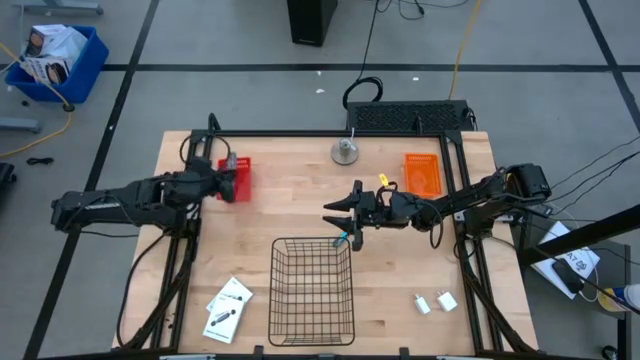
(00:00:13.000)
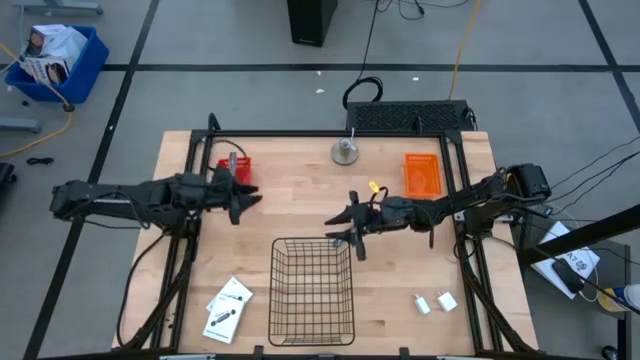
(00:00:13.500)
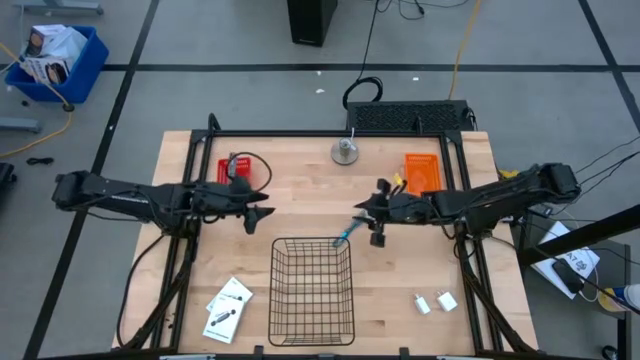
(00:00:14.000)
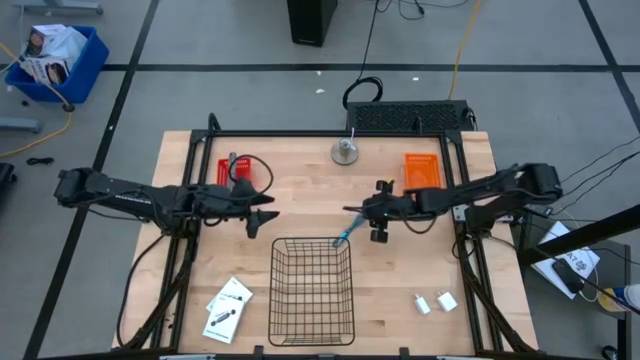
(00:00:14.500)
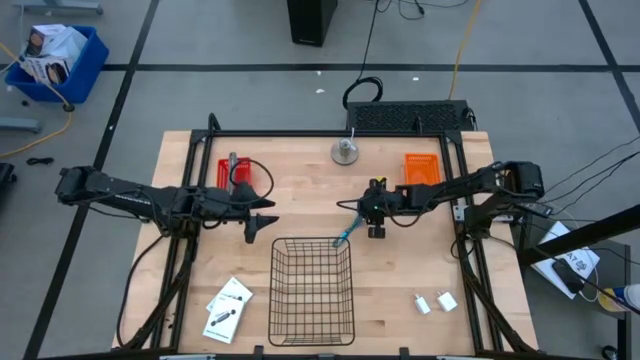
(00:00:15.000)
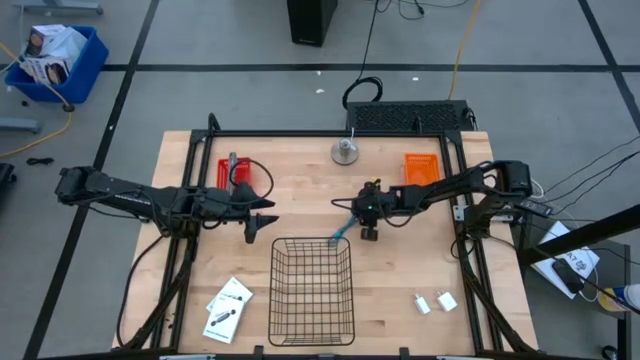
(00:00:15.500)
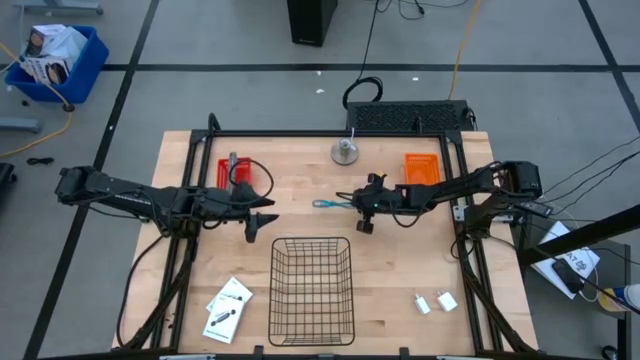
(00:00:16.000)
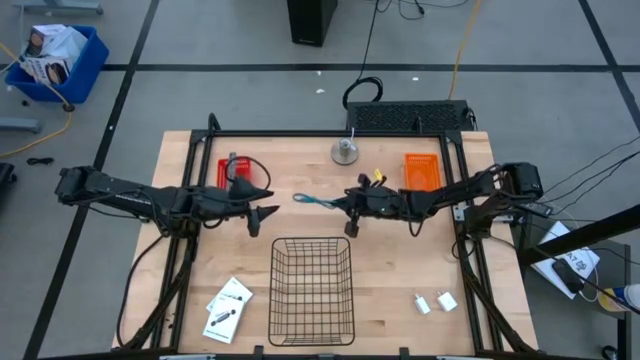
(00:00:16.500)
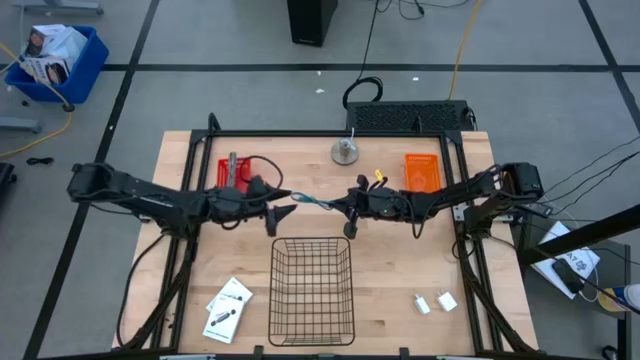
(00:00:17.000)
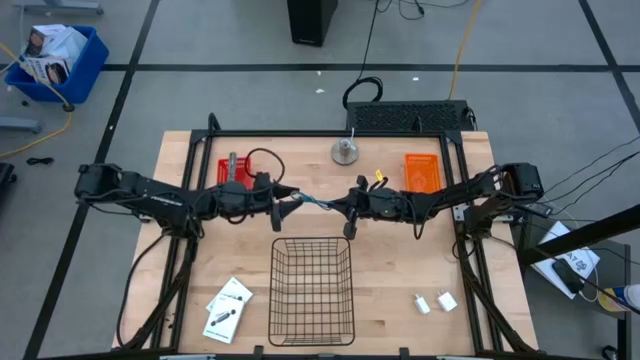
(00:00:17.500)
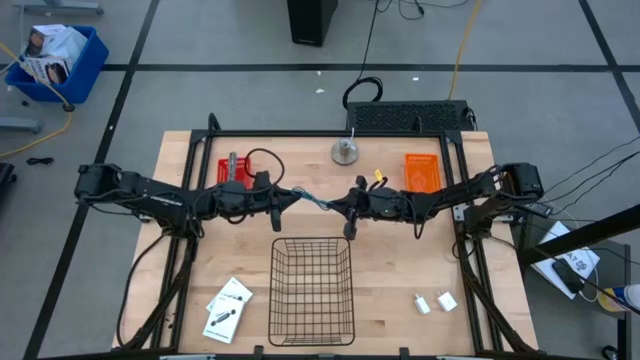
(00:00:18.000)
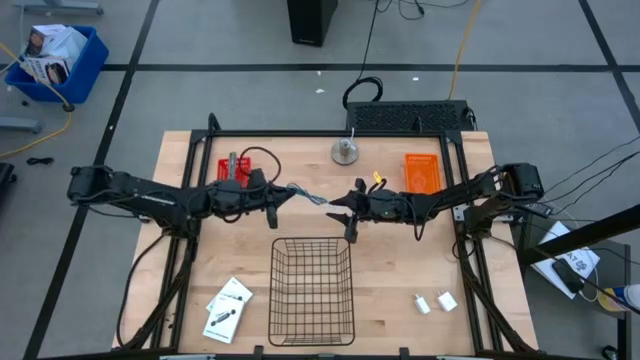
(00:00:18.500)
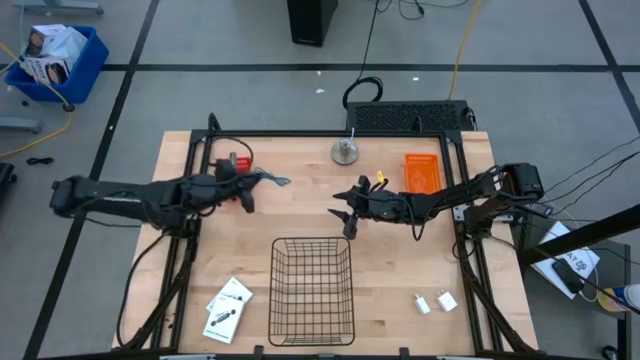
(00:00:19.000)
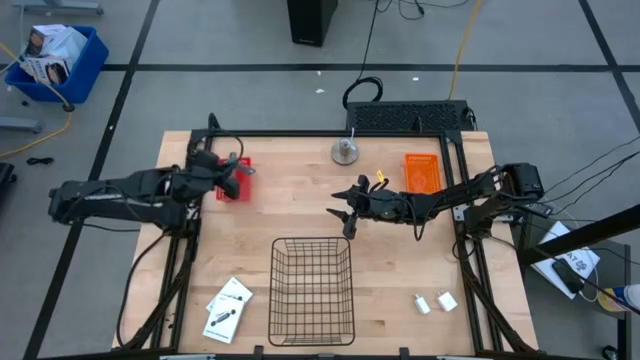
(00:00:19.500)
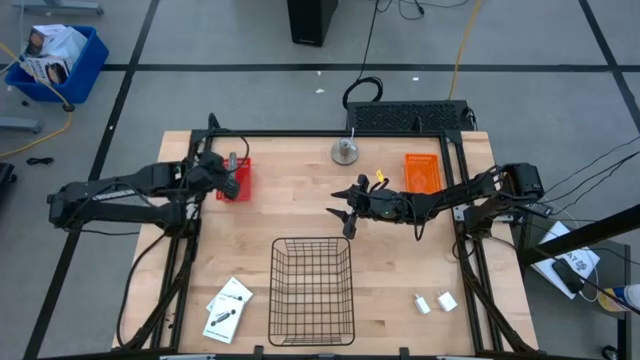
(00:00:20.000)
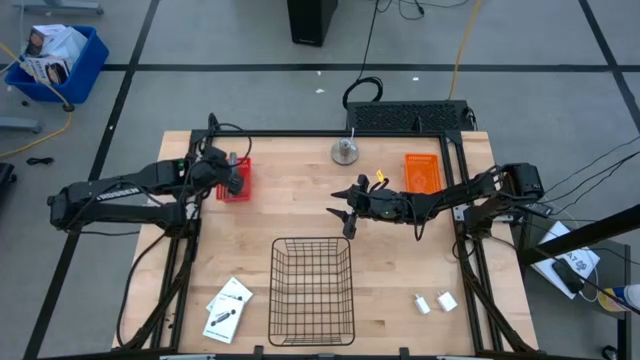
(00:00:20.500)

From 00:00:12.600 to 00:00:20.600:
Task: Pick and place items into bin
Put the blue and black charger cable into the red bin

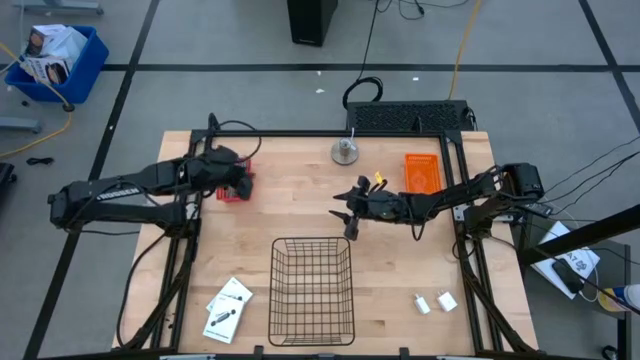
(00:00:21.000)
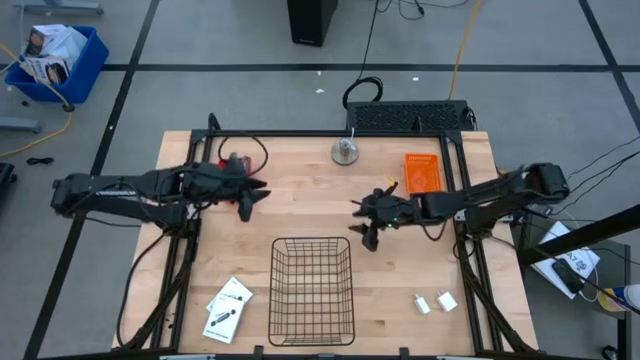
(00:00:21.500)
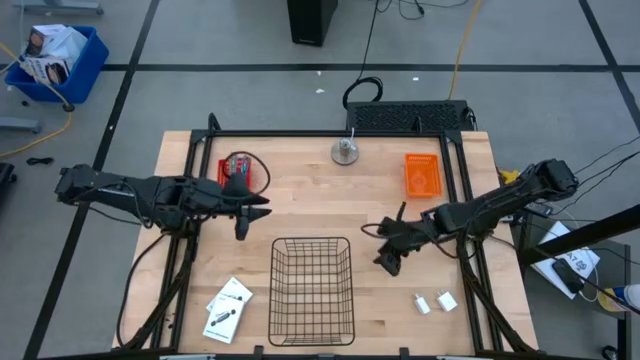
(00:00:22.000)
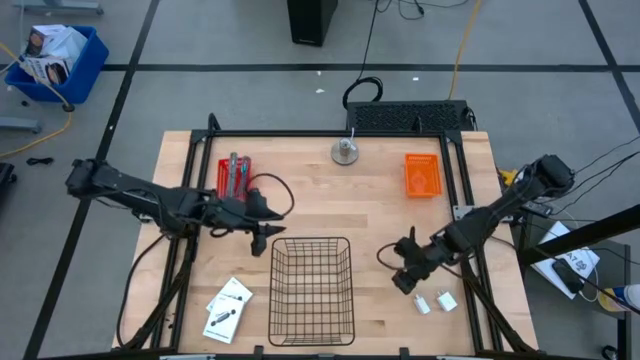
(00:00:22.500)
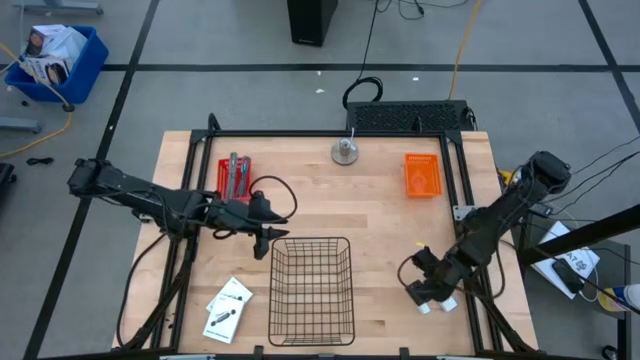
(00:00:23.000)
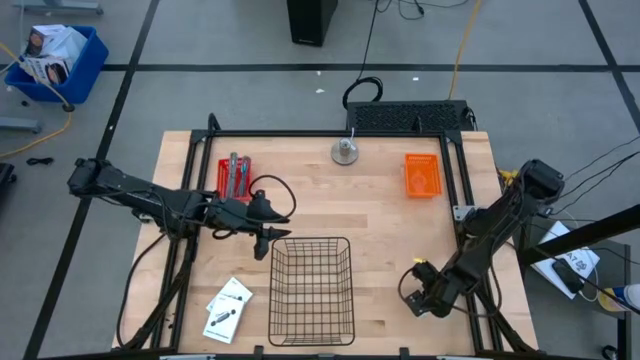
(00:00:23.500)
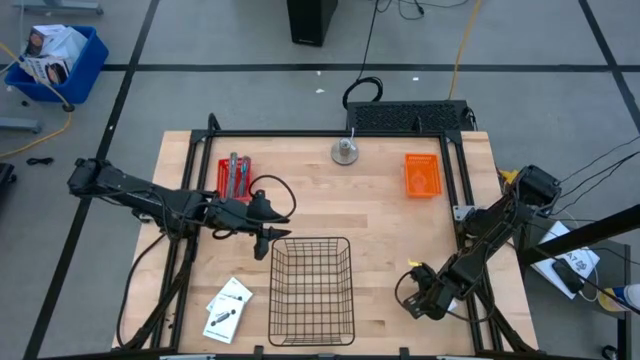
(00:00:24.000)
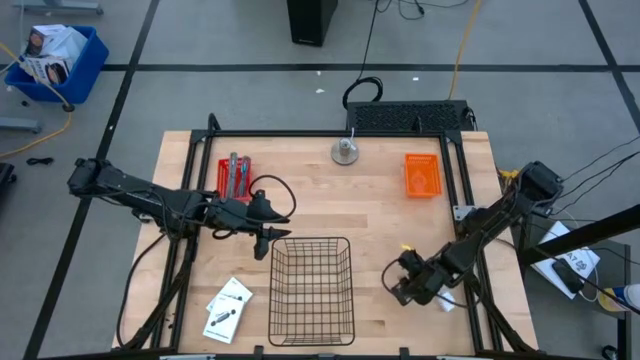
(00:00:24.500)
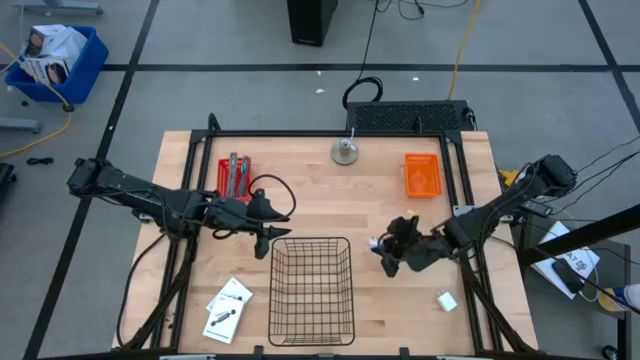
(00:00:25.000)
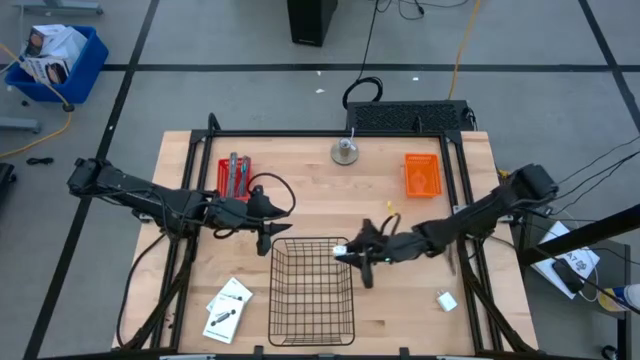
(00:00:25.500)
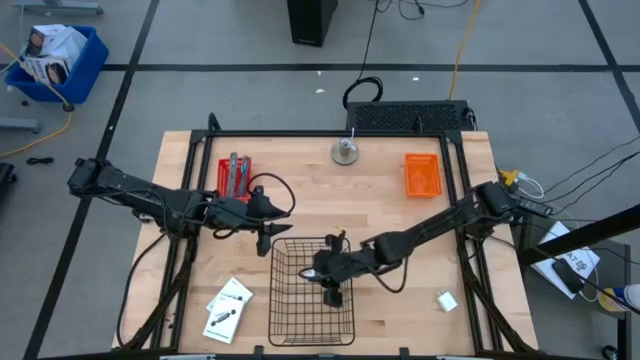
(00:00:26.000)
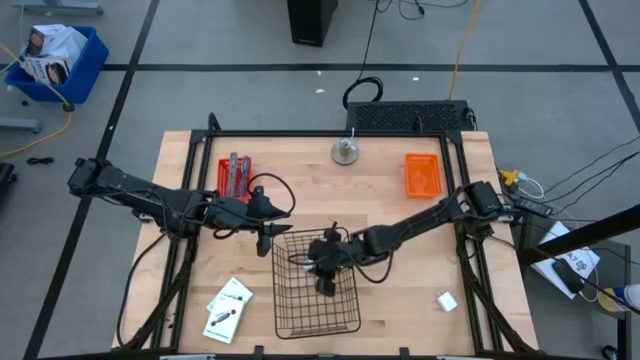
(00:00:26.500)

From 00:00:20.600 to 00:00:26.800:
Put the left charger adapter into the black wire basket

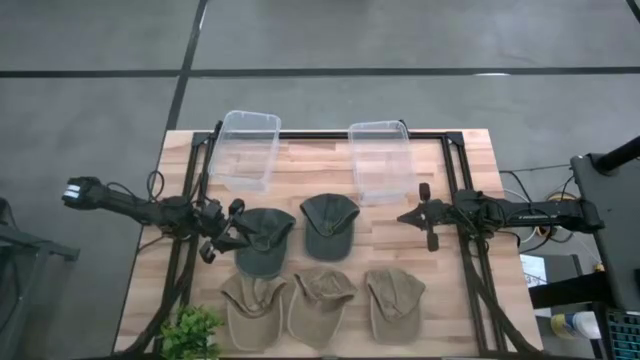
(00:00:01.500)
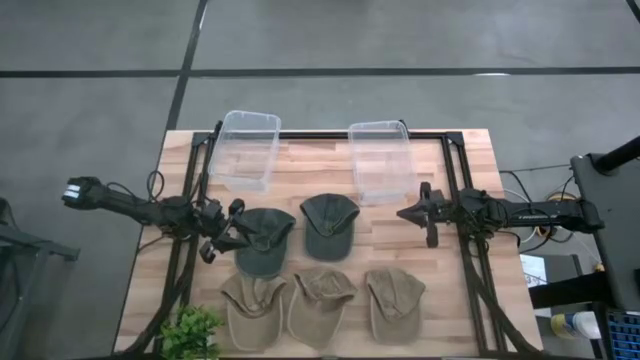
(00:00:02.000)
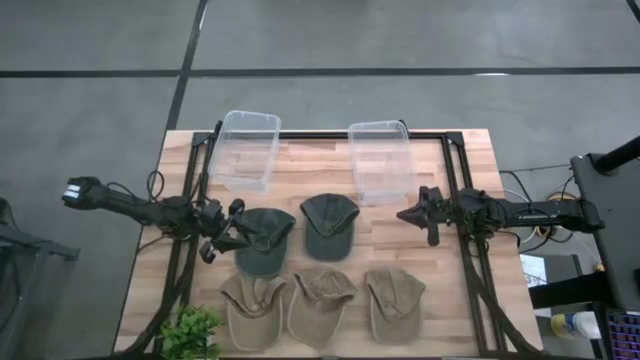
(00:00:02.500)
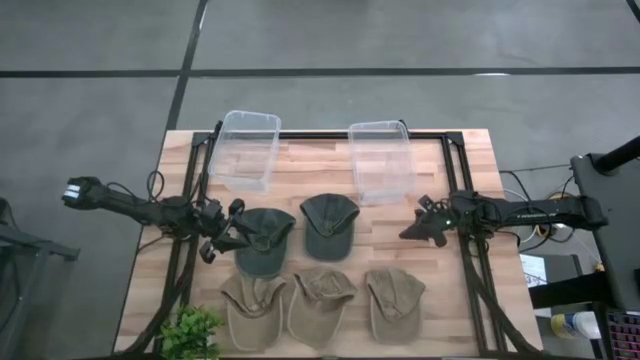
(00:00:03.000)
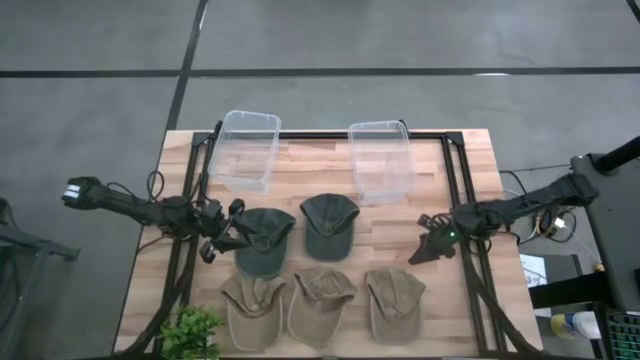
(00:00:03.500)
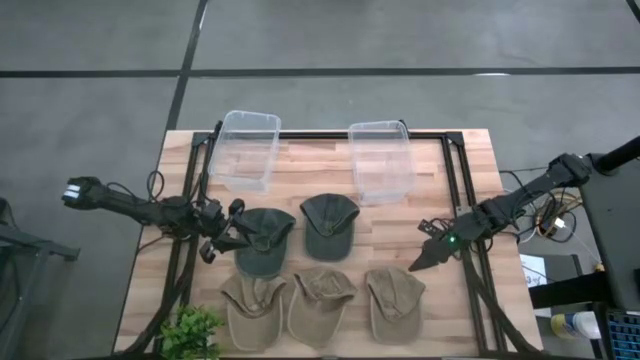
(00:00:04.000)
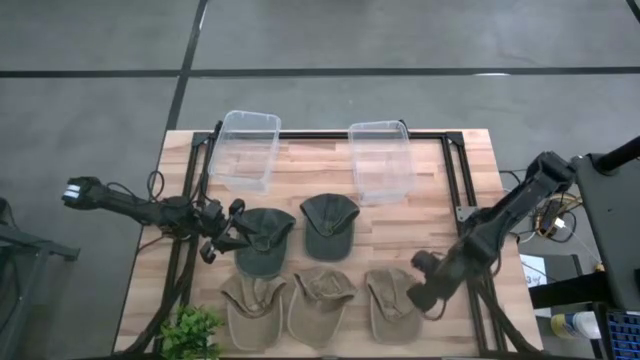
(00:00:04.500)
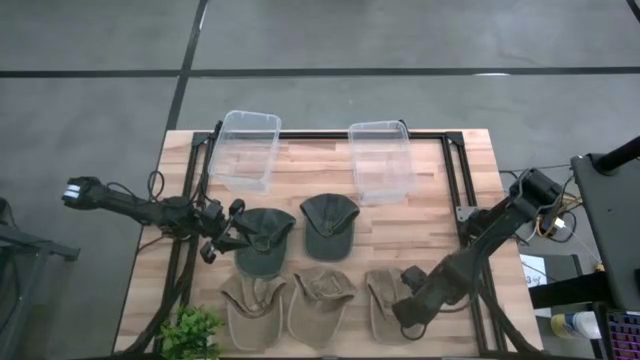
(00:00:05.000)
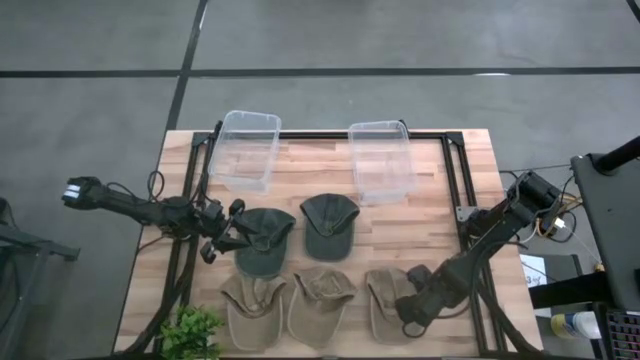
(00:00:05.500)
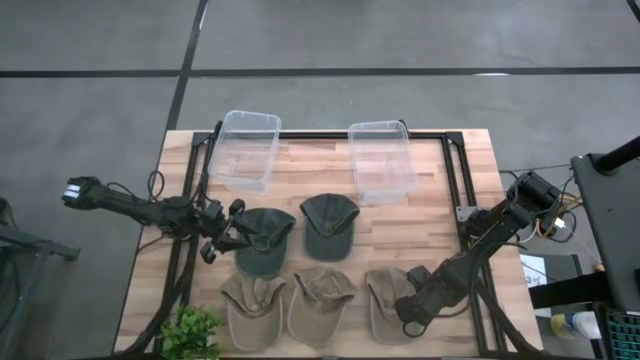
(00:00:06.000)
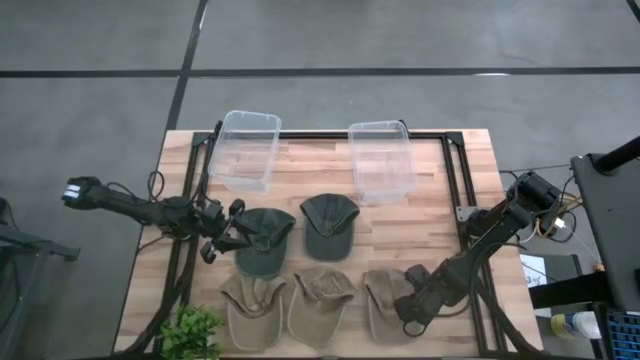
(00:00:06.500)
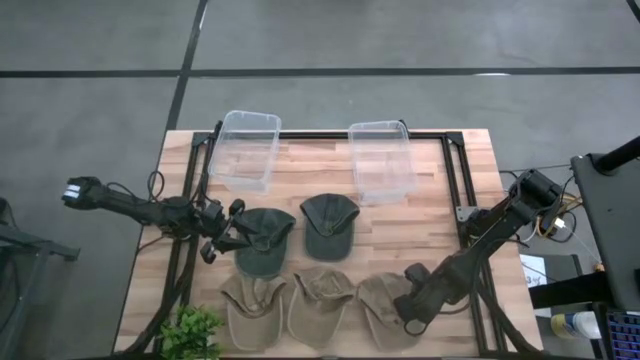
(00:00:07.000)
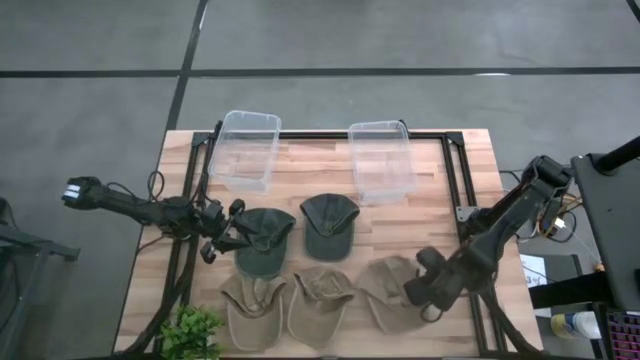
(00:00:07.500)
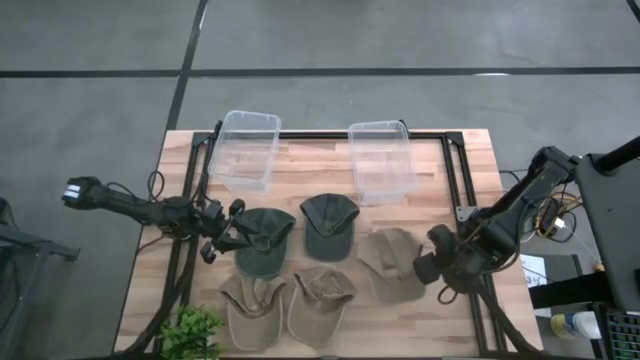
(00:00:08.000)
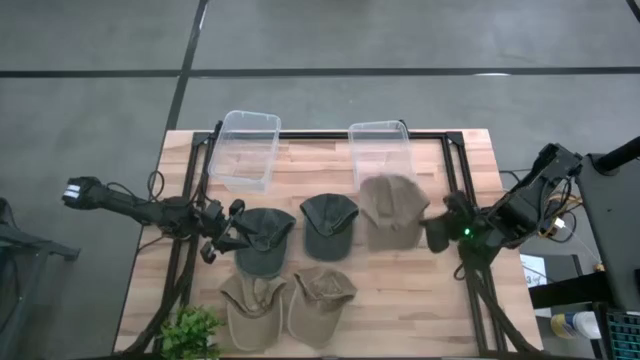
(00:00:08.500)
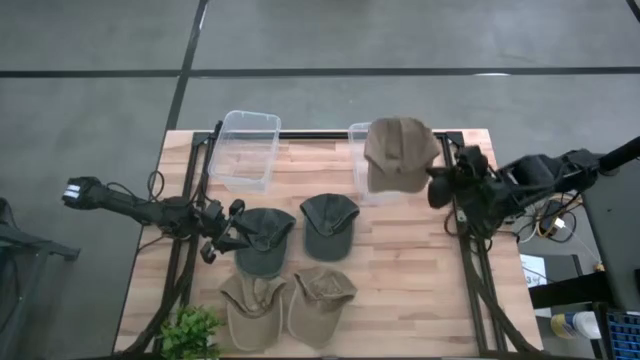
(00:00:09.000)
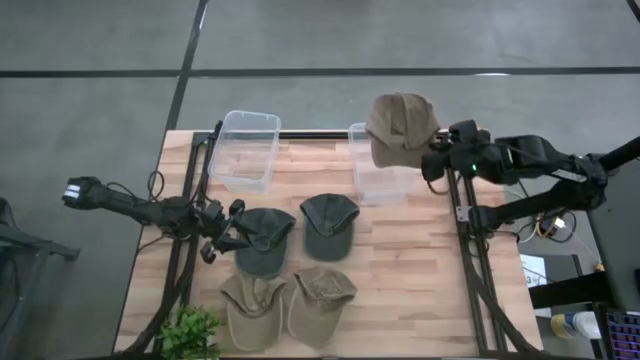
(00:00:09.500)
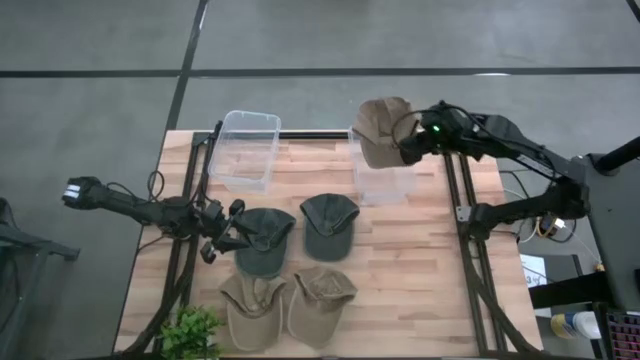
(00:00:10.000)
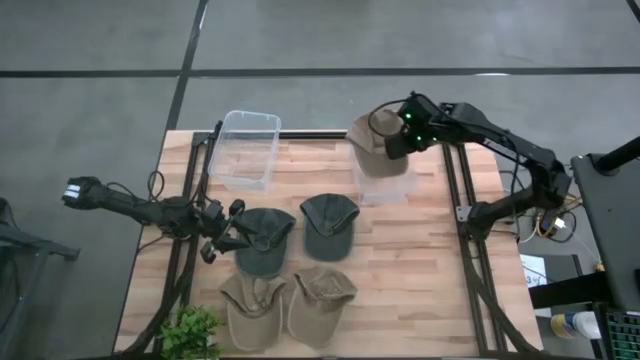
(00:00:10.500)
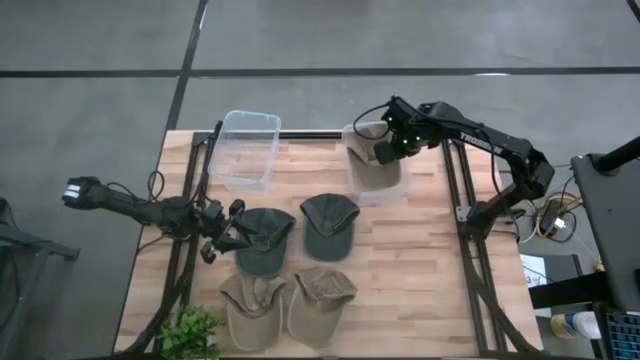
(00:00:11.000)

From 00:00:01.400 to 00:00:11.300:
Task: Pick & Place hat
Put the right brown cap into the right transparent bin
